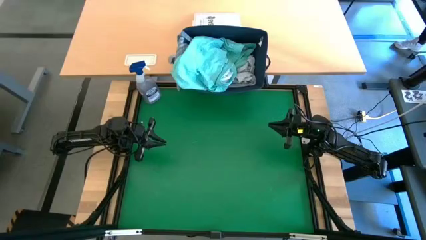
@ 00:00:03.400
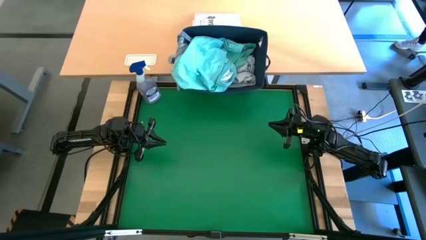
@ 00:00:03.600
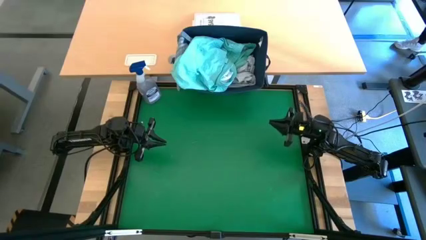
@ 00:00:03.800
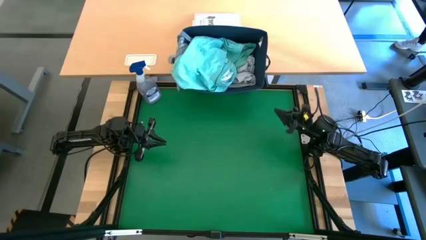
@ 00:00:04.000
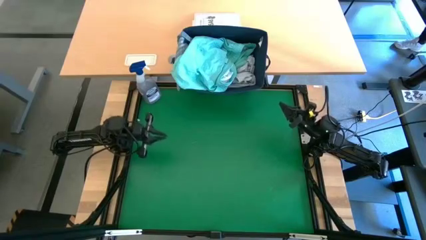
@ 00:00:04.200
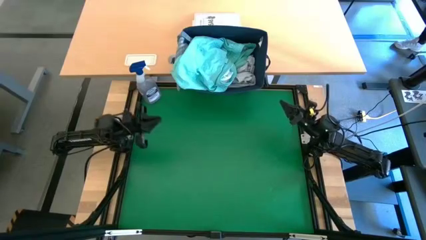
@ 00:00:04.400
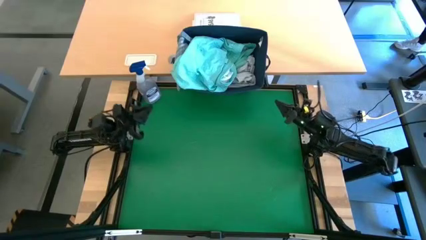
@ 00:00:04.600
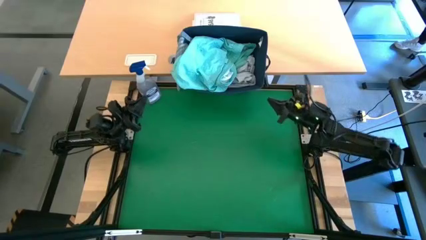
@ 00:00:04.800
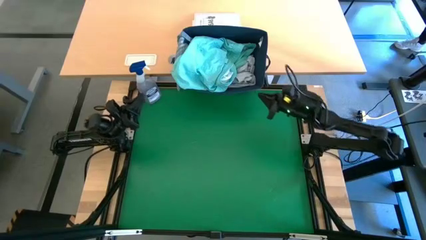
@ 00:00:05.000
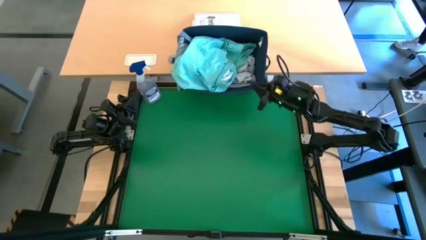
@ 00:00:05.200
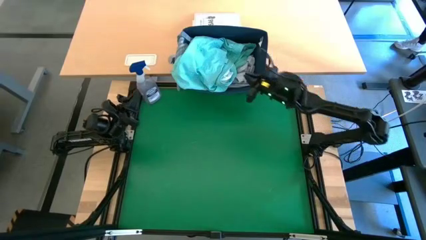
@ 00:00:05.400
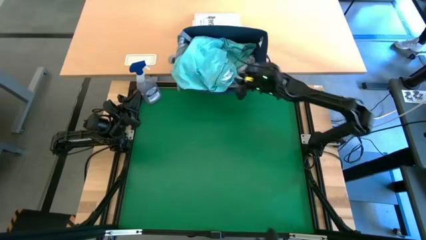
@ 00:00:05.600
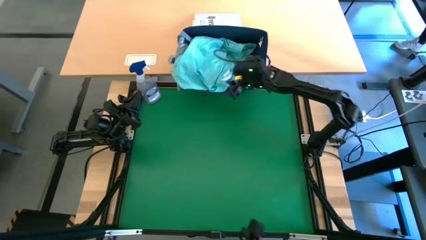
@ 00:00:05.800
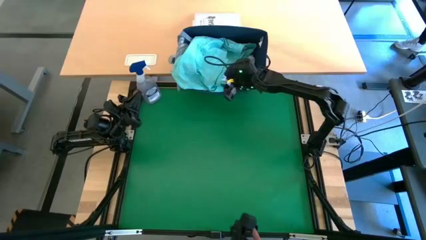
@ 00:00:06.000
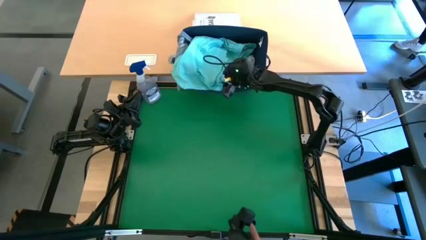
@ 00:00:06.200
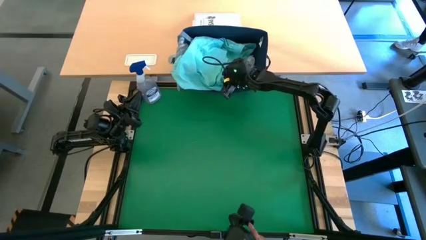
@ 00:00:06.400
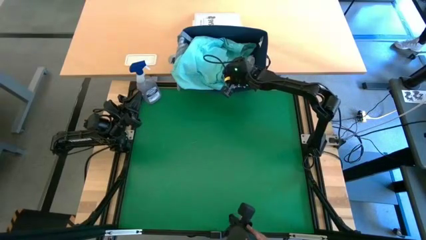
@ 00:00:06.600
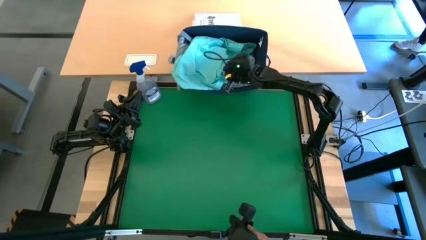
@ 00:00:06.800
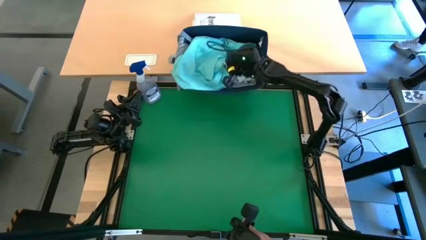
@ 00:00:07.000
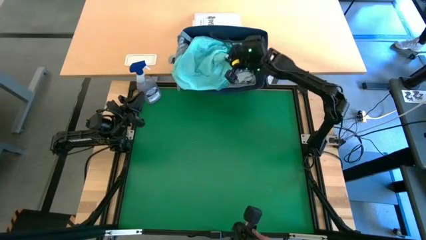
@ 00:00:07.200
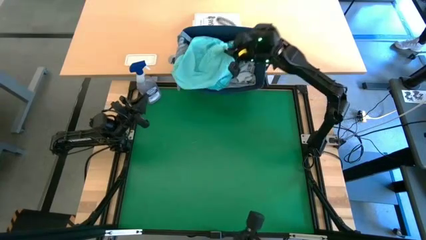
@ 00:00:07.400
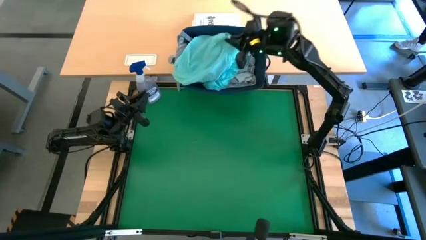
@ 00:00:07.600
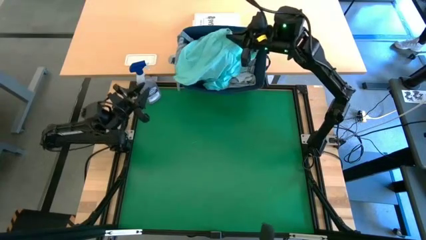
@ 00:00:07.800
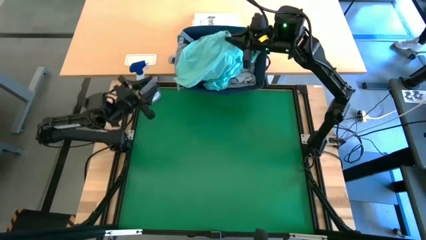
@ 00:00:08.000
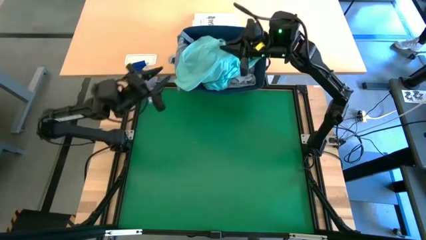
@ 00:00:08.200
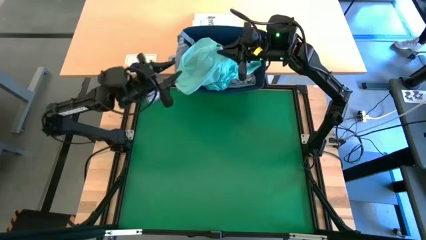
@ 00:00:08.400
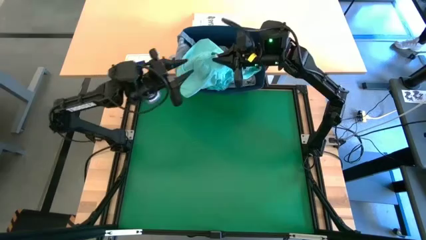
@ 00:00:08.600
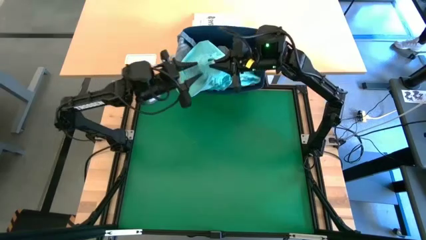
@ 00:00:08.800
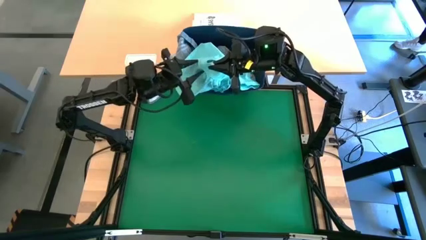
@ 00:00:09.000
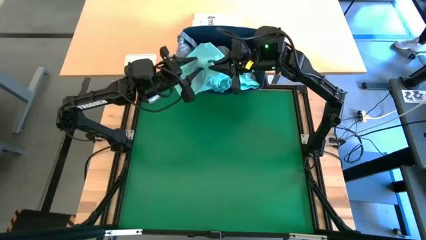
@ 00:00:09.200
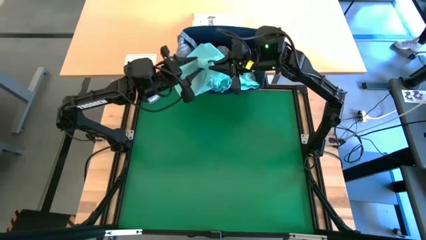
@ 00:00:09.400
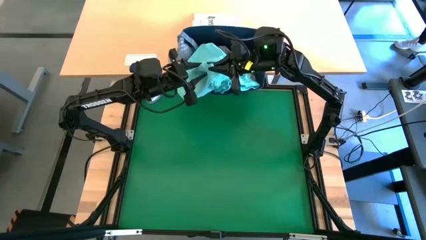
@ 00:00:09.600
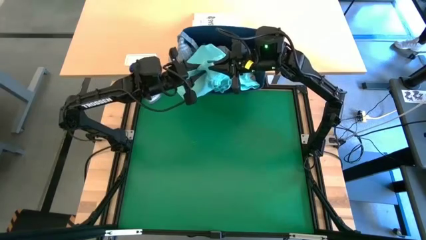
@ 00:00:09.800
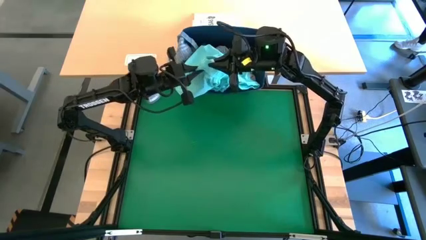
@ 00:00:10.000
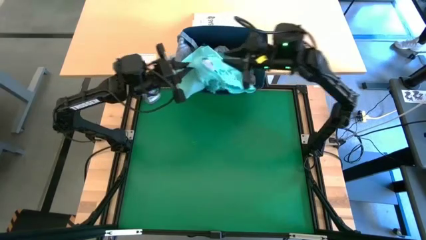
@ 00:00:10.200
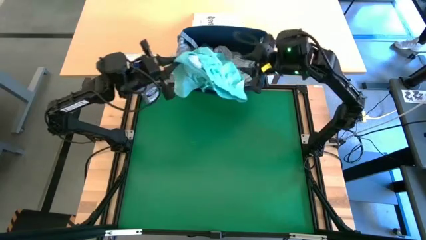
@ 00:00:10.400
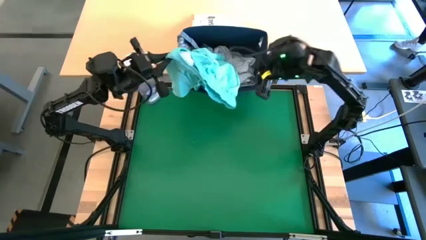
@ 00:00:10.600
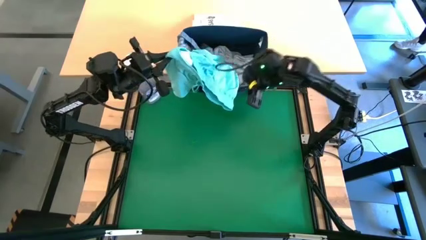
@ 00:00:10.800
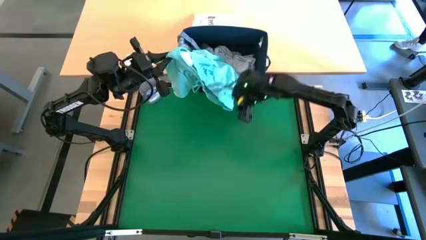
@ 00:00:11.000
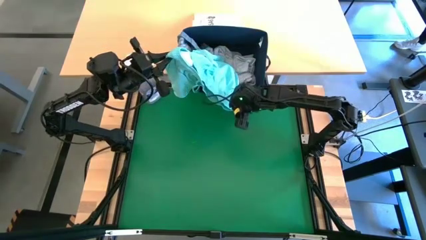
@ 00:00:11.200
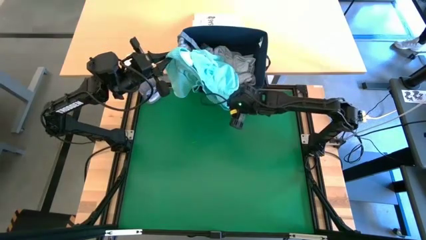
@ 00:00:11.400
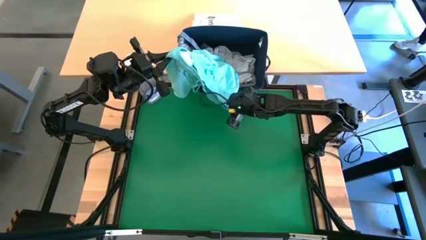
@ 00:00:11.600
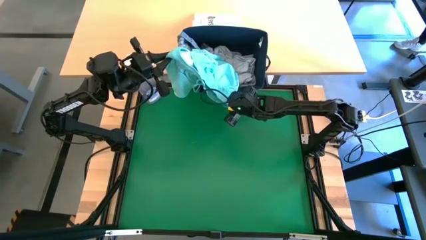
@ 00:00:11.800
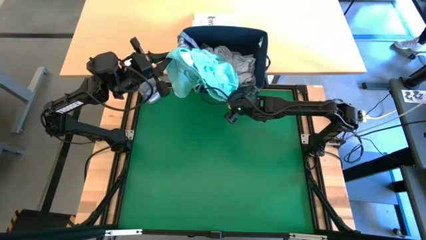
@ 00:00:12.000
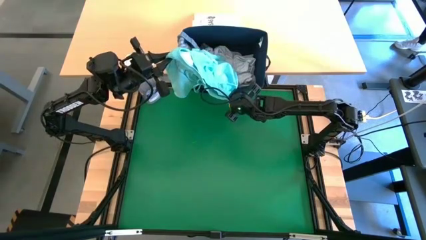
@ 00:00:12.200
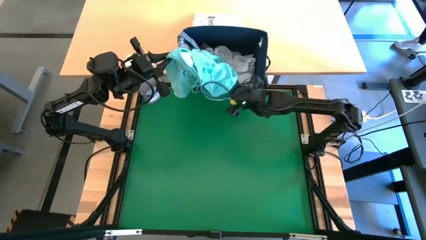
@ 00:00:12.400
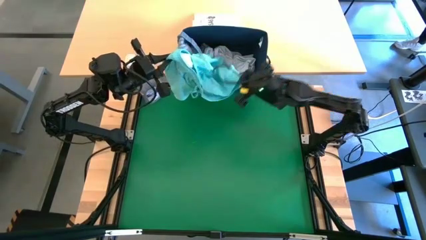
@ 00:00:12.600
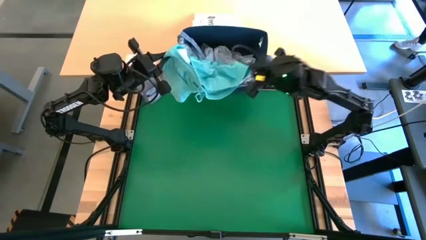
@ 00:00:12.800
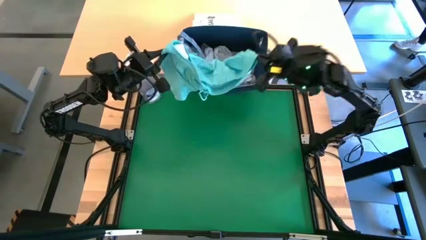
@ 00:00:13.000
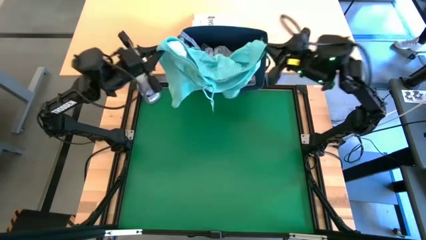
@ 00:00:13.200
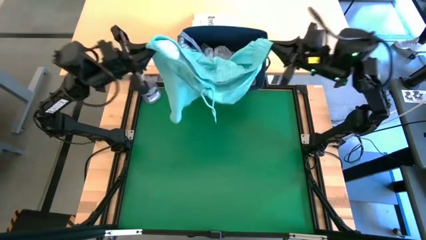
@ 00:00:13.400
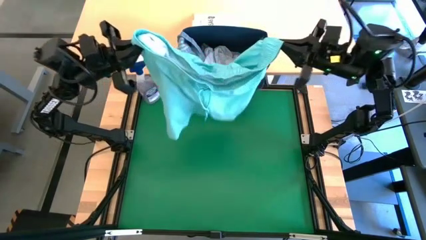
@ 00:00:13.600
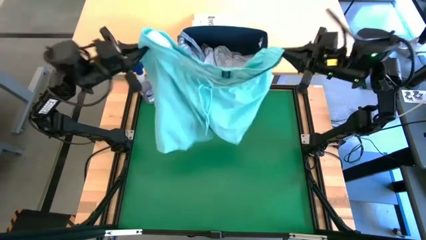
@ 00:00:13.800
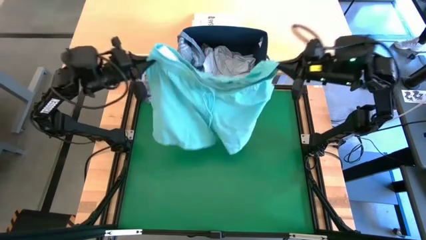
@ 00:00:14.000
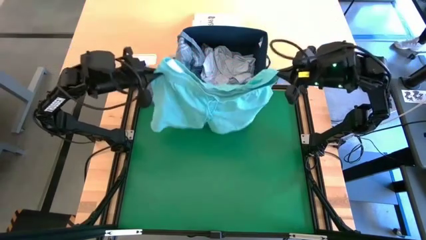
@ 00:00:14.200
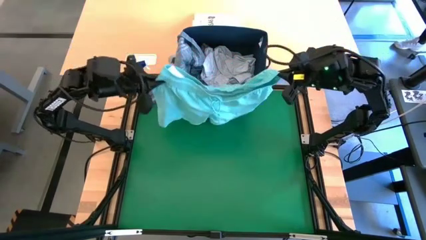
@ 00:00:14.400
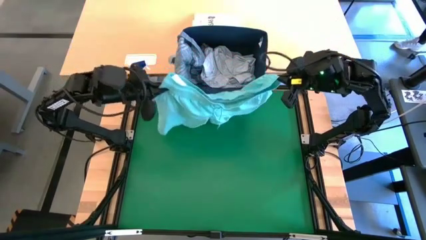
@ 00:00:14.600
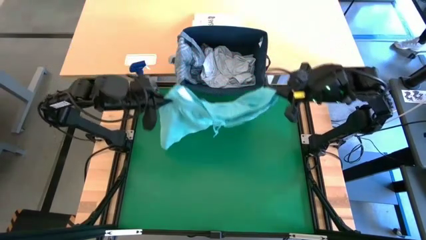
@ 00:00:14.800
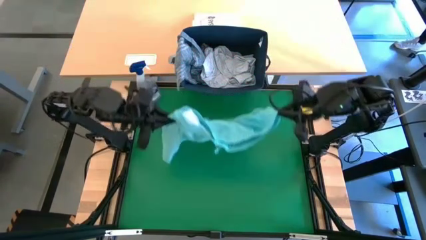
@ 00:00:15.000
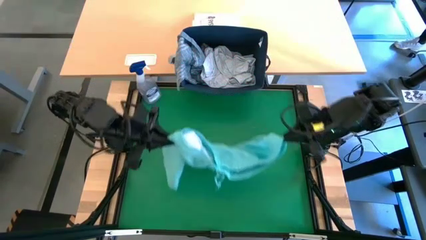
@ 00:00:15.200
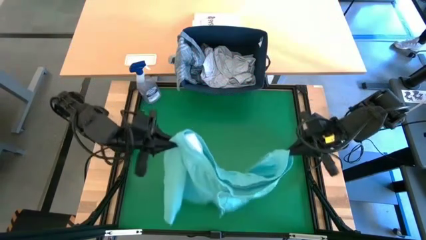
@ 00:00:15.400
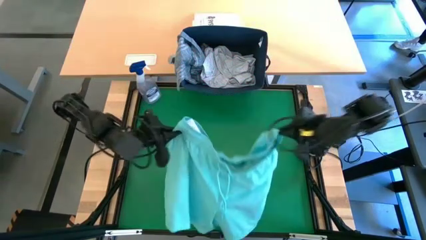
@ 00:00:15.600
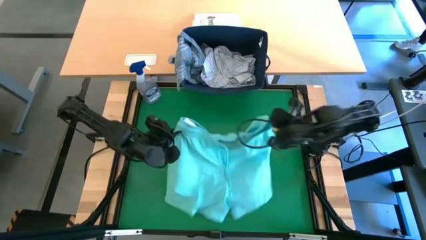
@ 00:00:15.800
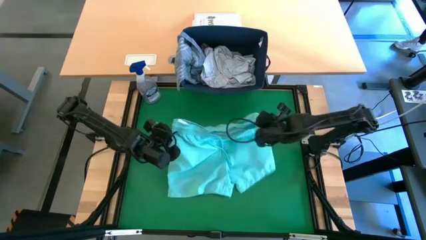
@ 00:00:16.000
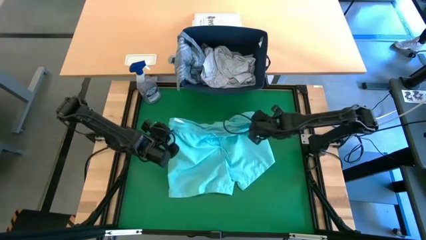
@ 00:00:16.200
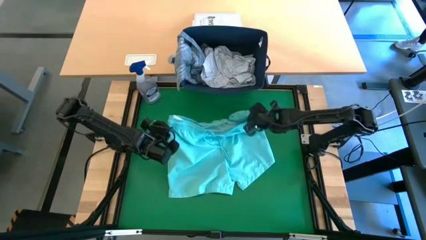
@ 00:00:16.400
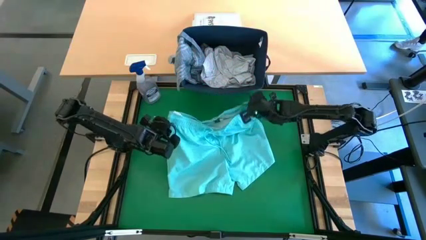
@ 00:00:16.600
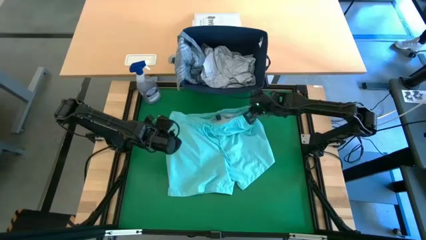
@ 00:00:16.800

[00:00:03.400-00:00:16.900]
Task: Fold laundry
Remove the blue short from the blue laundry bin
